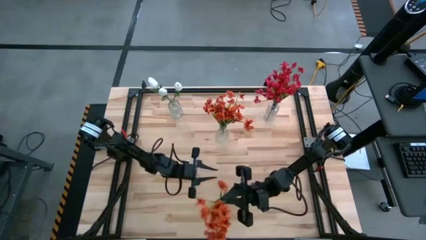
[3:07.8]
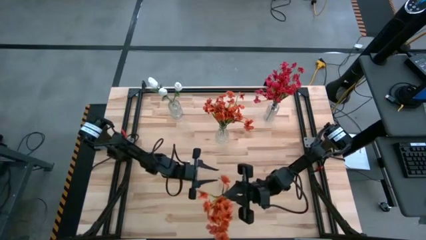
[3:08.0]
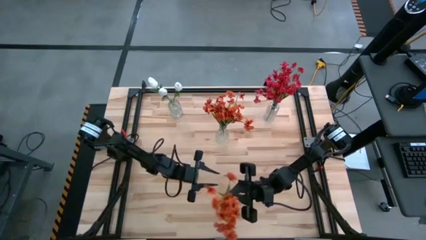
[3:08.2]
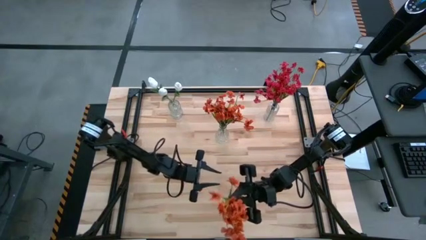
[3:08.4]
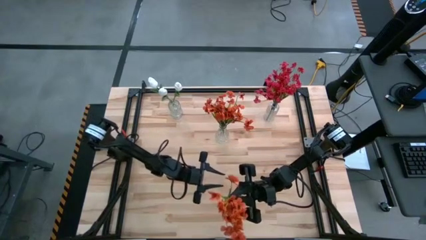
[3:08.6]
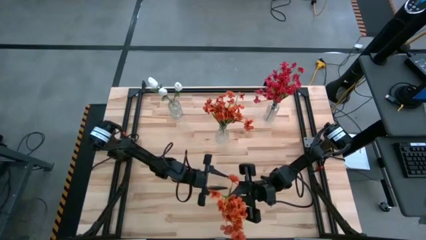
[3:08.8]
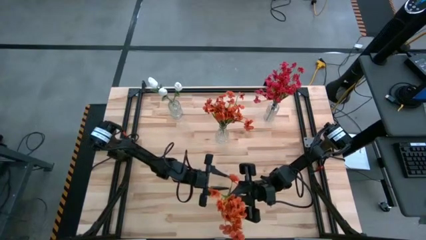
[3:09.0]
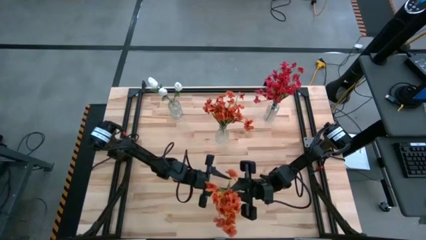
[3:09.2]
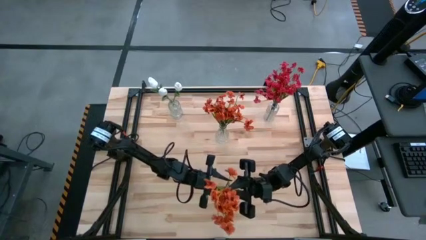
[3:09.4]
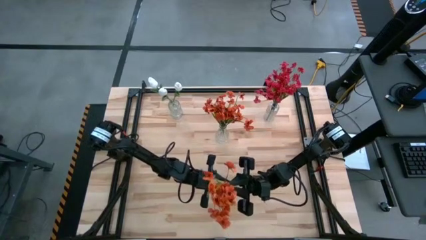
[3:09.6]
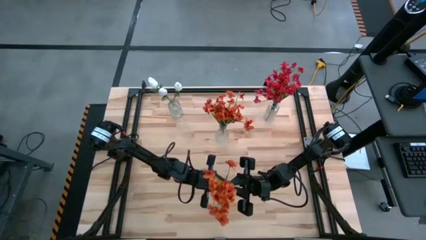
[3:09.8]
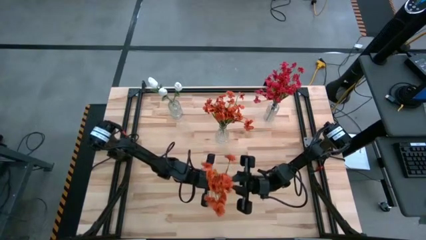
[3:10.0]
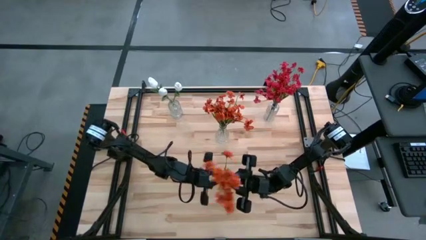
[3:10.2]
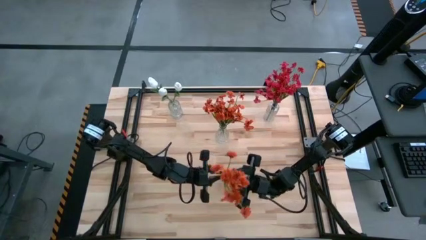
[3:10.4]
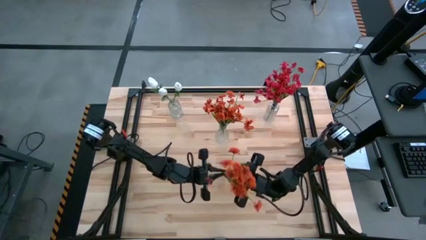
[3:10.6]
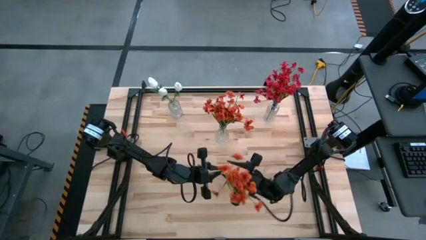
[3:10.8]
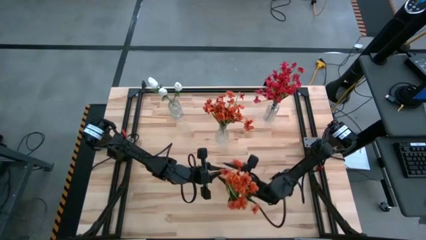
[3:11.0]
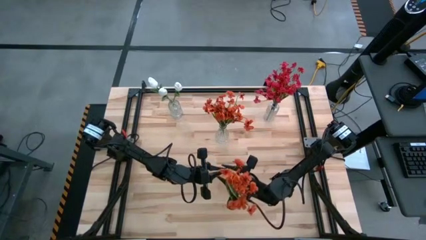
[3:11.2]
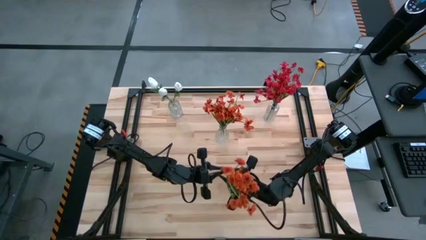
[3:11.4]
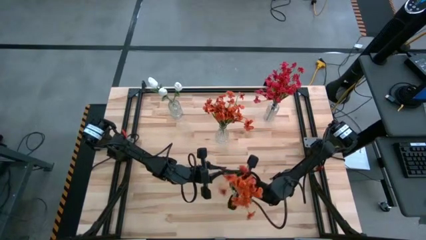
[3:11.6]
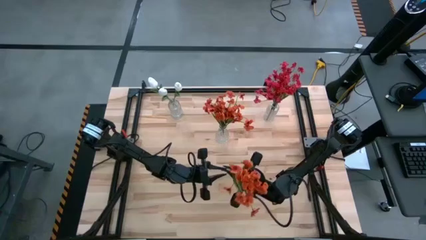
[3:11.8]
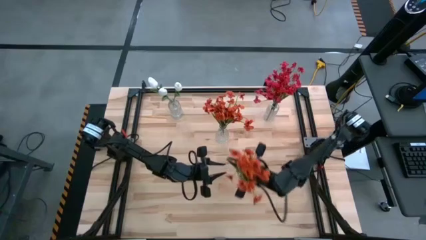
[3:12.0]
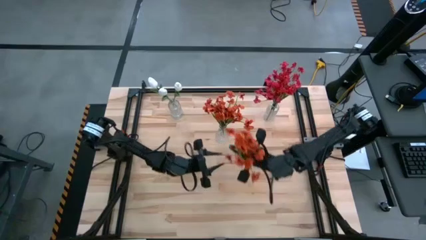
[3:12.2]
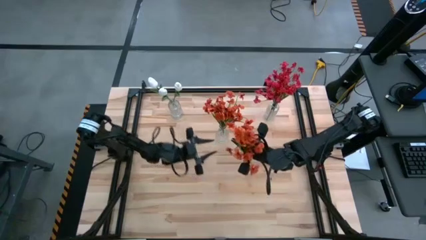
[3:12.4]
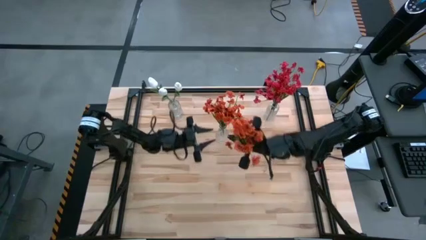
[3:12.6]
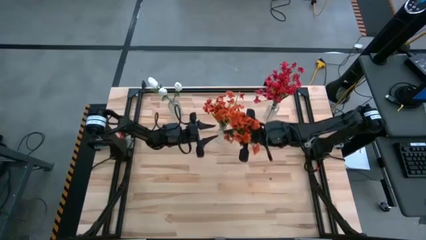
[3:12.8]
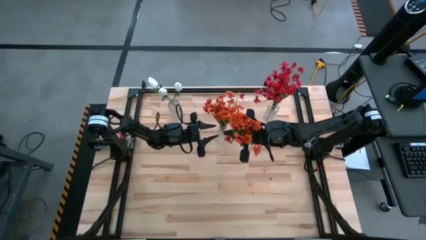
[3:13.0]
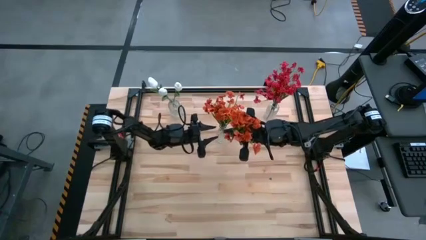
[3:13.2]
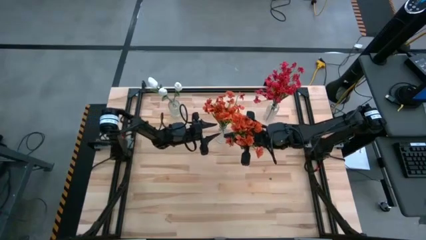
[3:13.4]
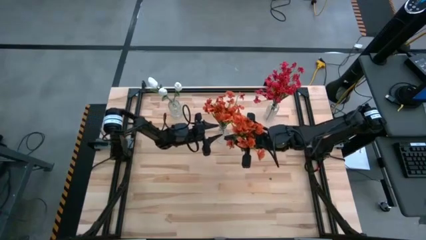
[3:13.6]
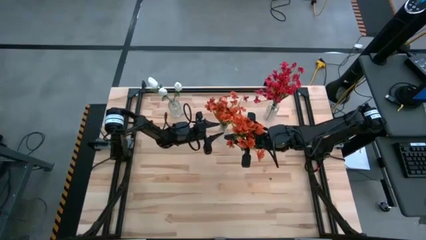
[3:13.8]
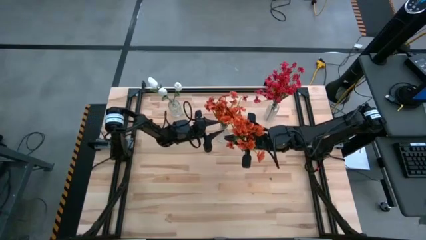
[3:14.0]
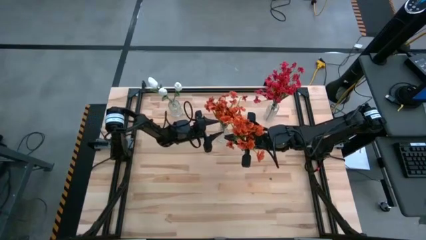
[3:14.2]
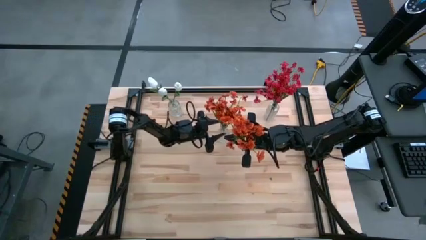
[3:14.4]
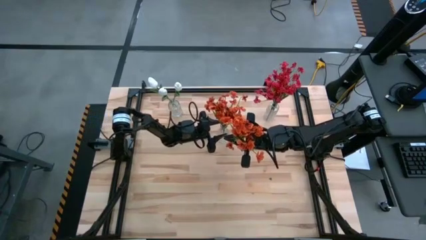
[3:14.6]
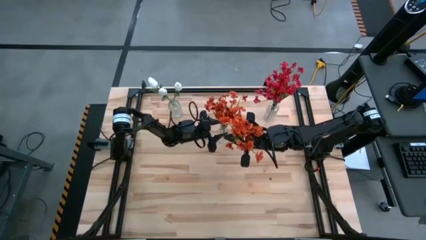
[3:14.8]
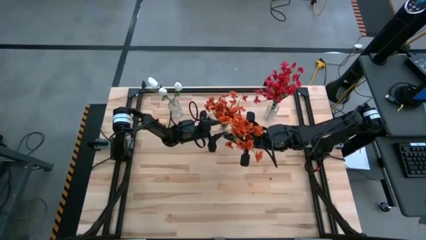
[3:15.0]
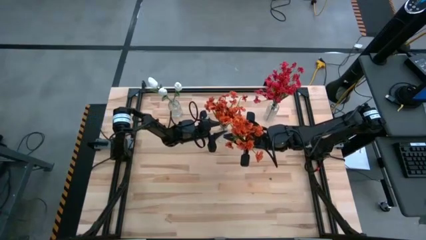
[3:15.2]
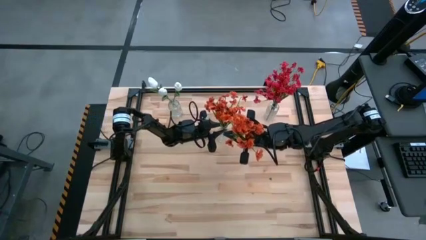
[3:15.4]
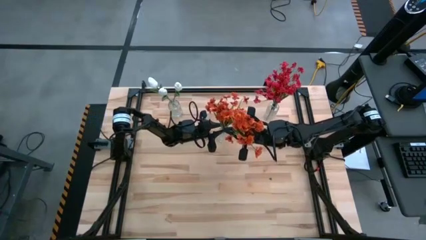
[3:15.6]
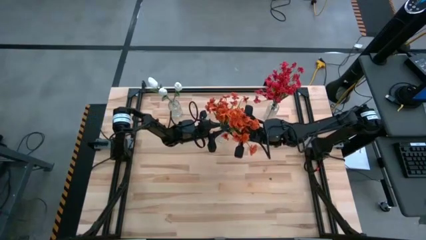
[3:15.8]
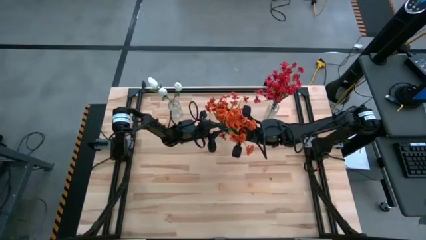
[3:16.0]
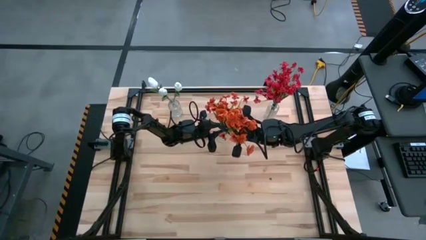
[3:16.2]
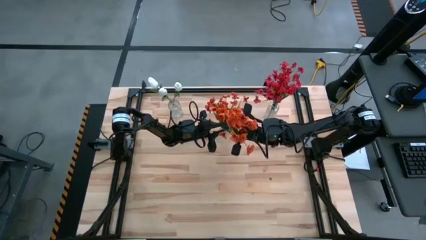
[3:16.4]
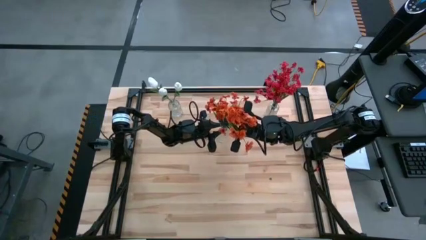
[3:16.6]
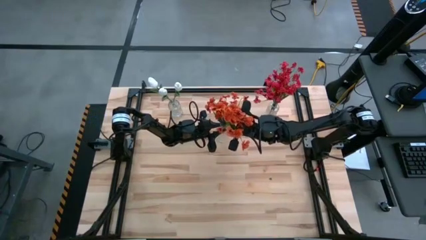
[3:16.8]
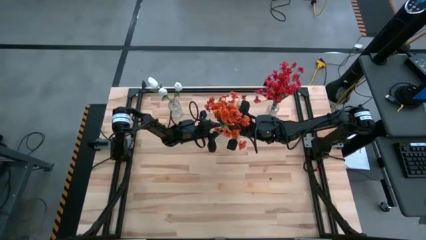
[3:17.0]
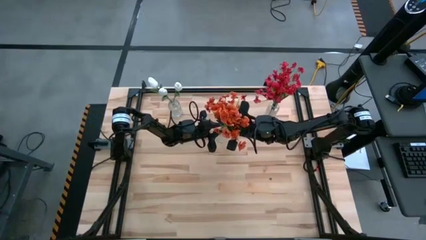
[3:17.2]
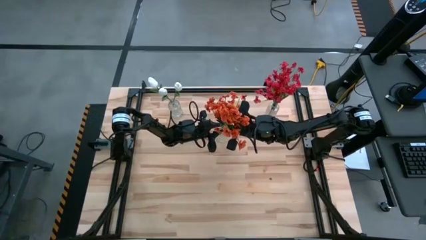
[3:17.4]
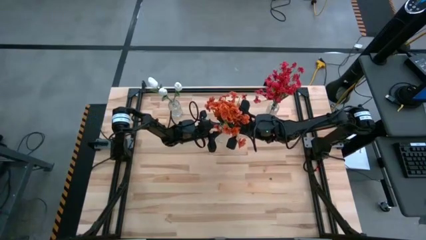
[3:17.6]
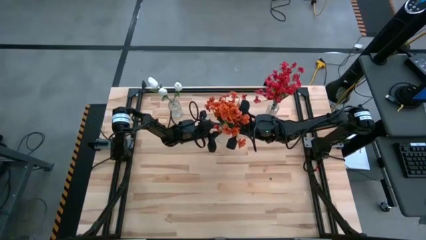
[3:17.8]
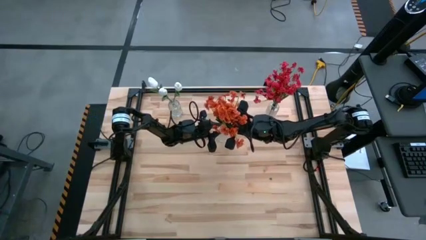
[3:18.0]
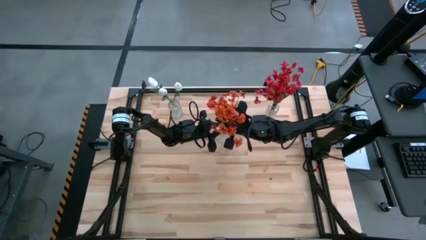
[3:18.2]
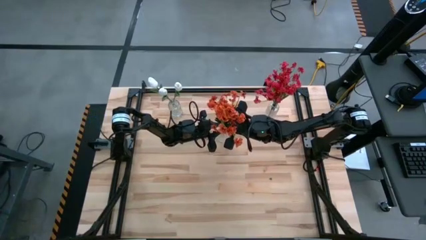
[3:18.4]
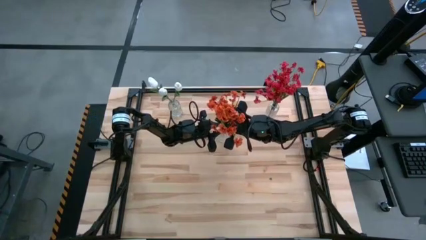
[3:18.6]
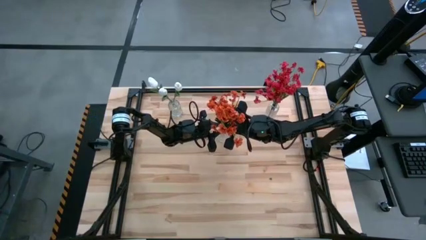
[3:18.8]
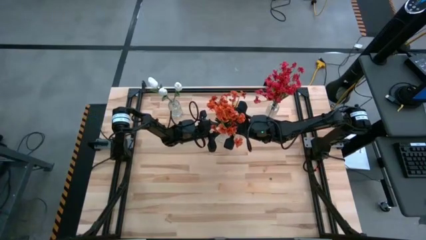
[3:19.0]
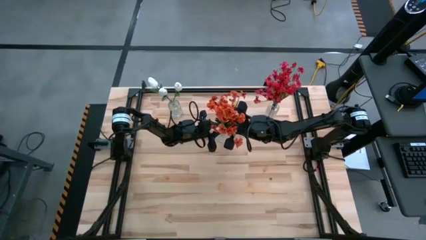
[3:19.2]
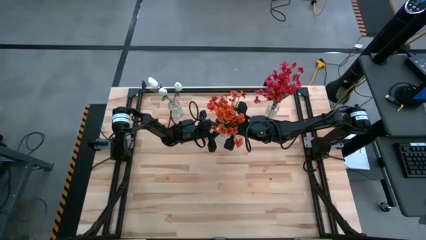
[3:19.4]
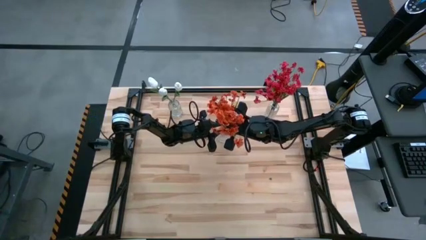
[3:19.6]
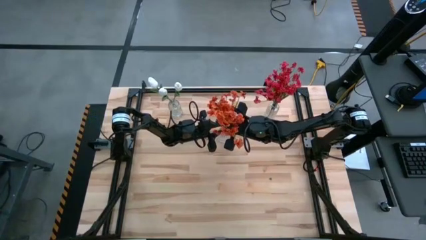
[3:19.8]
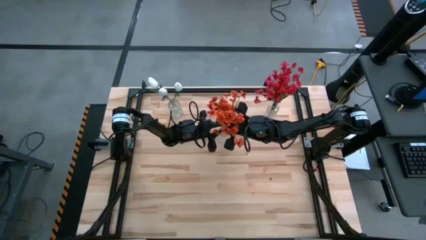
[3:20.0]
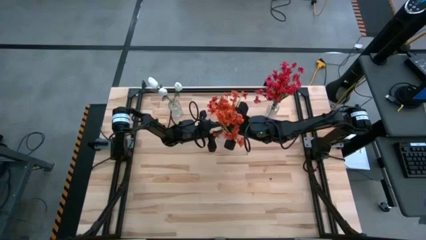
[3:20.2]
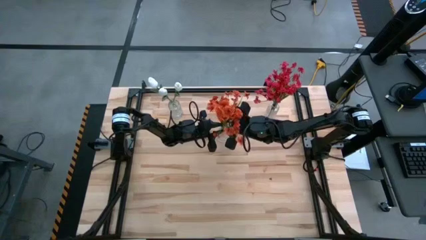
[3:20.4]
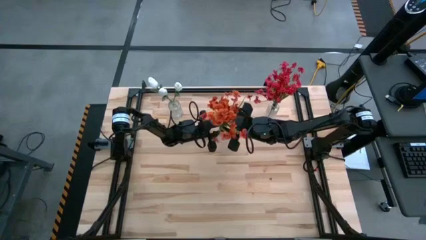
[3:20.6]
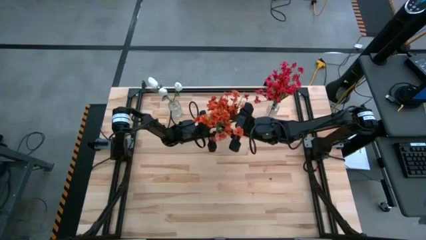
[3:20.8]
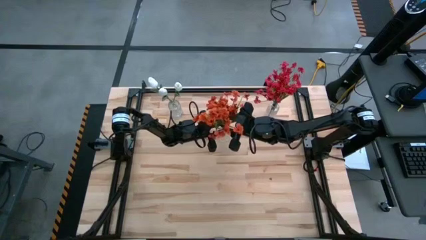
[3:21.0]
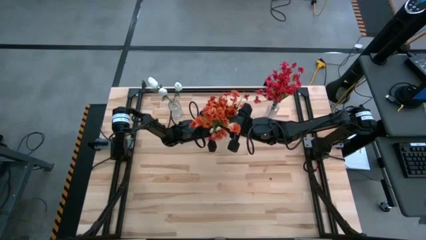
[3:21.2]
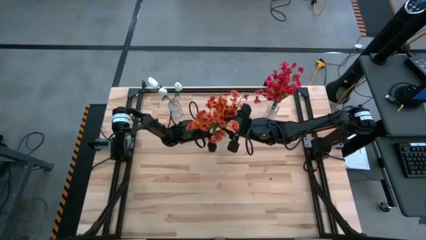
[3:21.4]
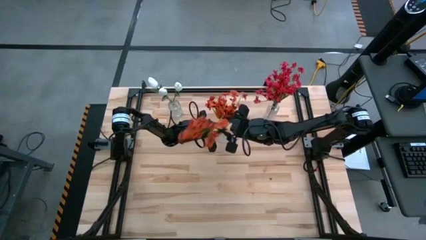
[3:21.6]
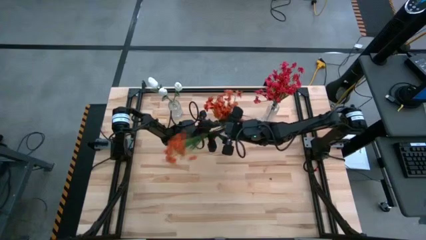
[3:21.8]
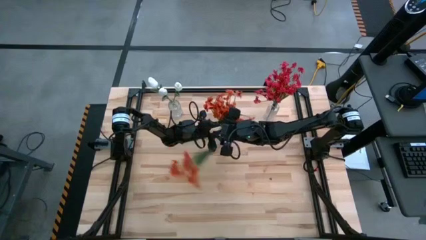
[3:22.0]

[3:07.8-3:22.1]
Task: Sort flowers into vase by color
Put the orange flowers into the bottom transparent vase

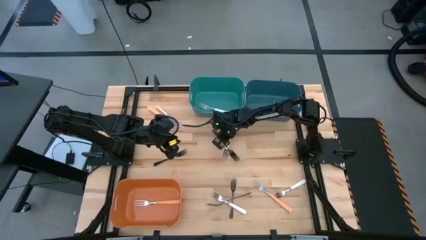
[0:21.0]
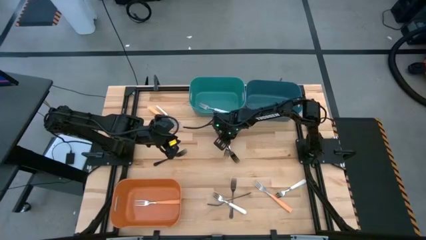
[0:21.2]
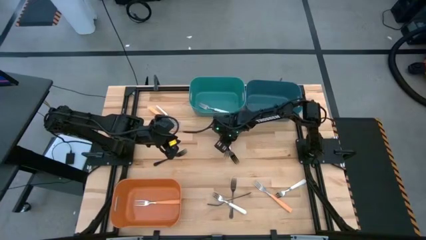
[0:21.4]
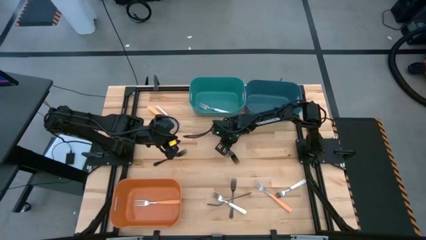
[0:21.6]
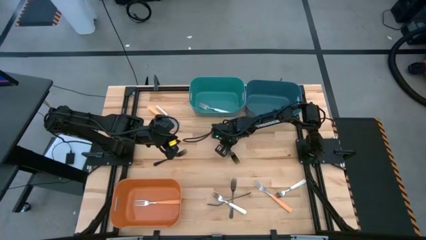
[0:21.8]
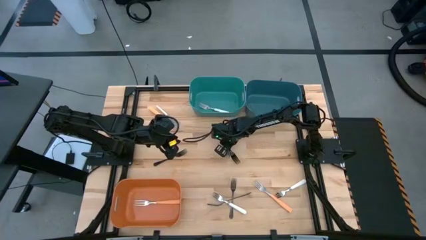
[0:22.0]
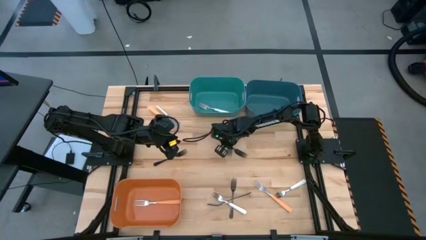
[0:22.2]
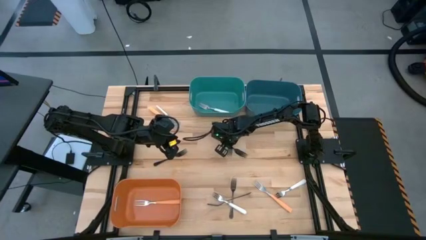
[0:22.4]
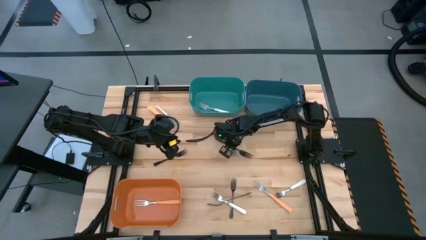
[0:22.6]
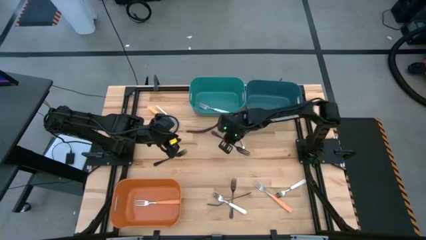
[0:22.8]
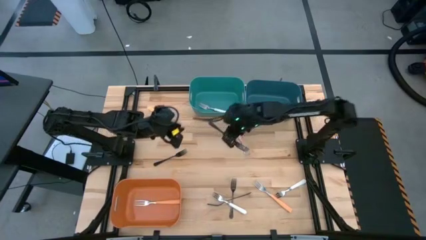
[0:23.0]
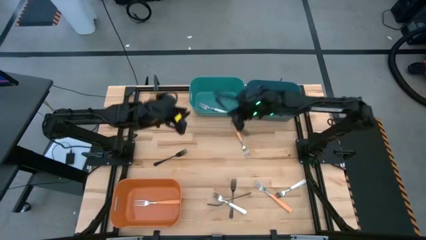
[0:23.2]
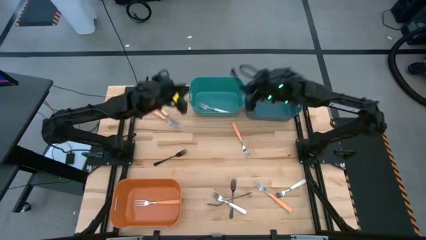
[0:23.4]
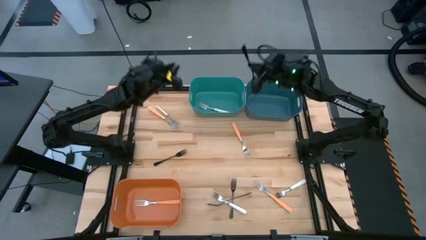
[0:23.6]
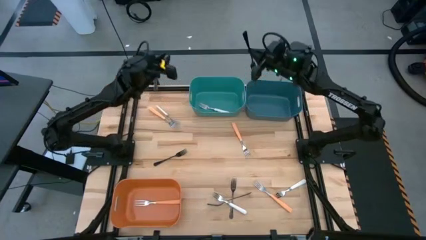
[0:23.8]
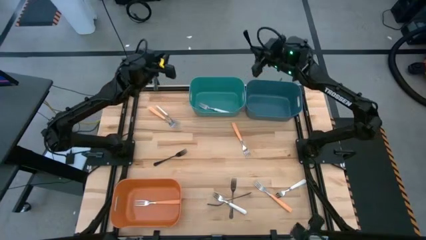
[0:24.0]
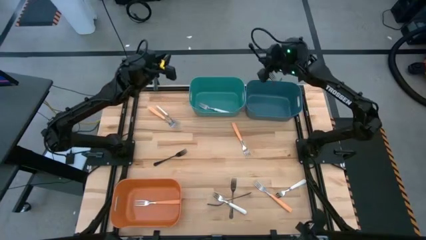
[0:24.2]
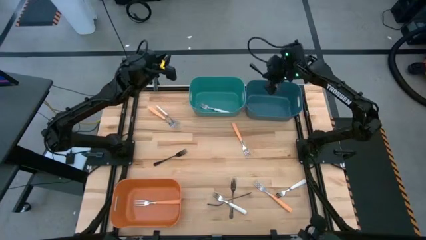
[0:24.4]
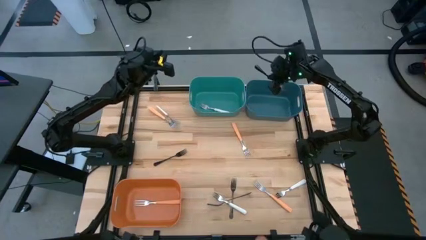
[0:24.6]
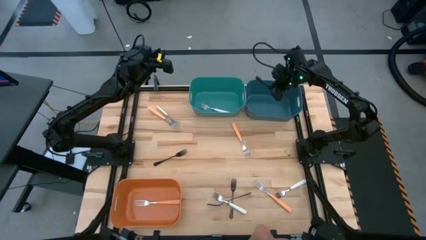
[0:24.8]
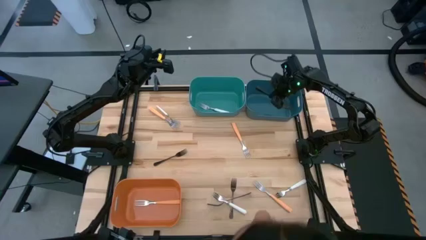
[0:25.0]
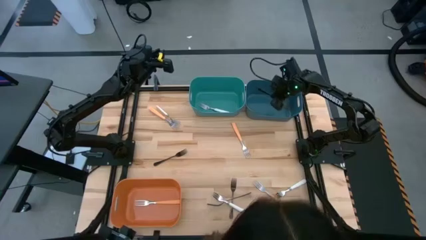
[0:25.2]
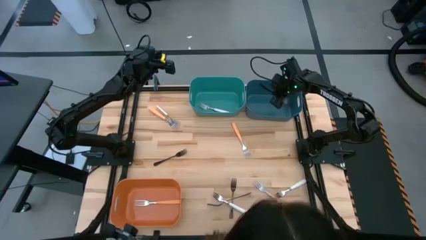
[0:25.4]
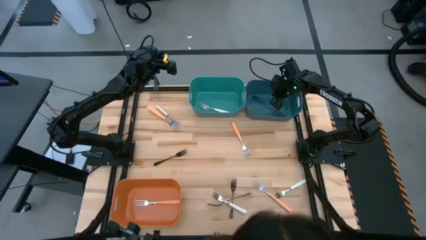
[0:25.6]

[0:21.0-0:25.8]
Task: Sort silverware by color (type)
Put the top black fork into the blue bin
